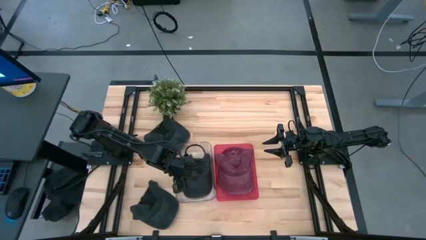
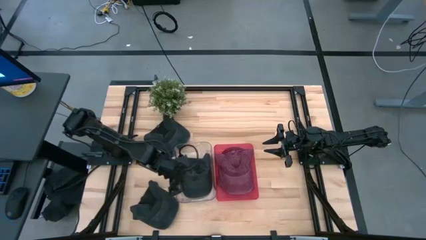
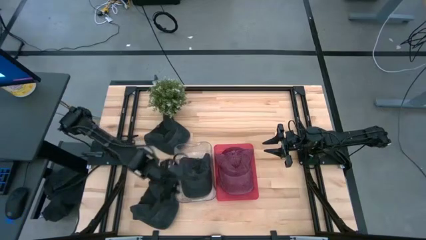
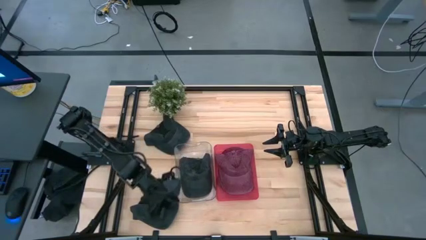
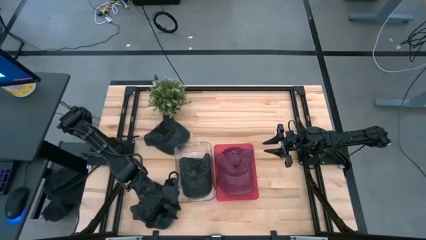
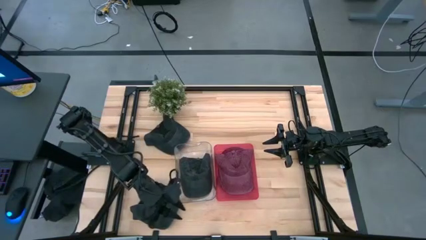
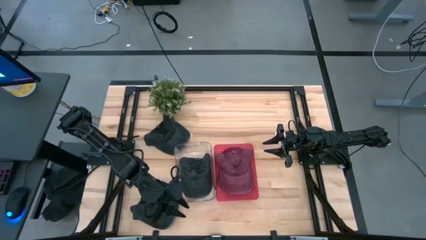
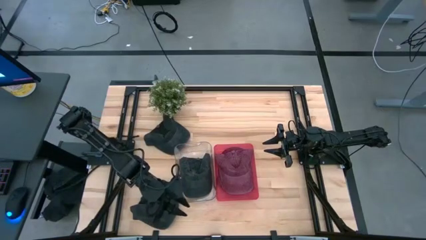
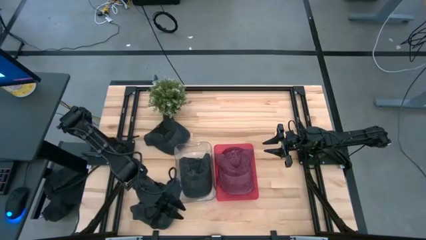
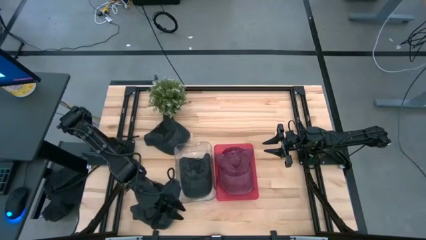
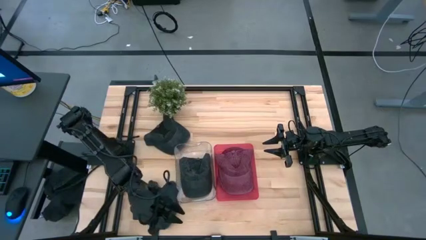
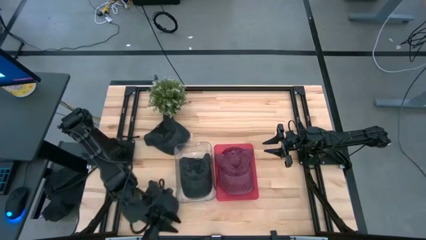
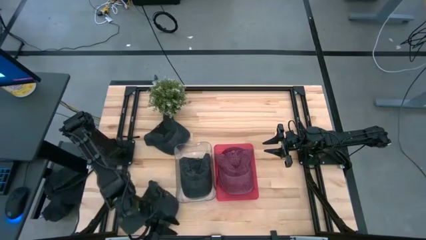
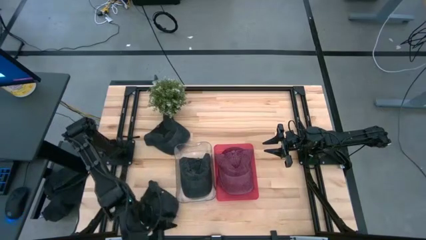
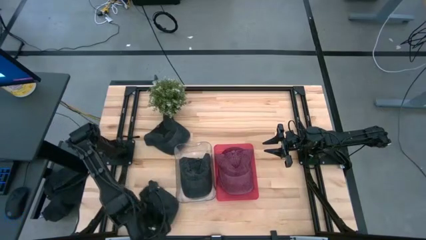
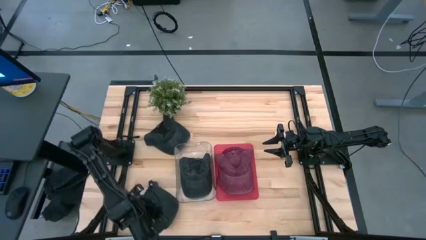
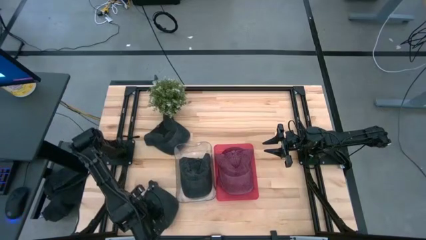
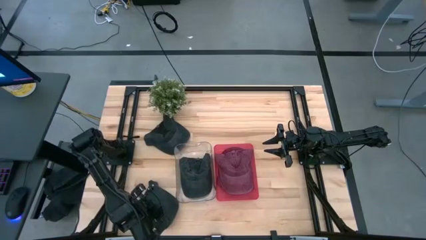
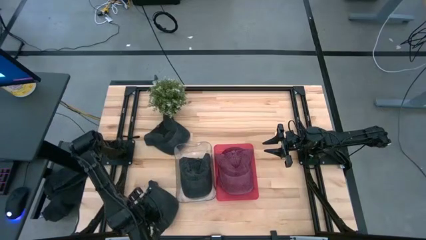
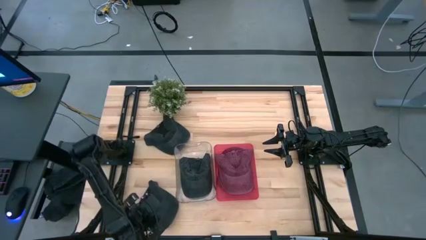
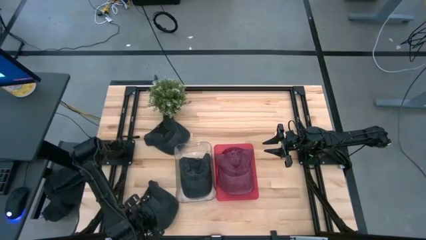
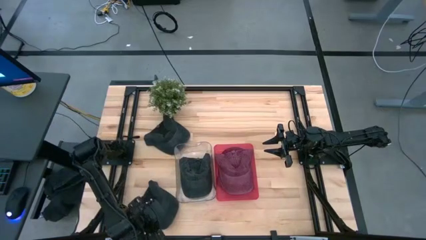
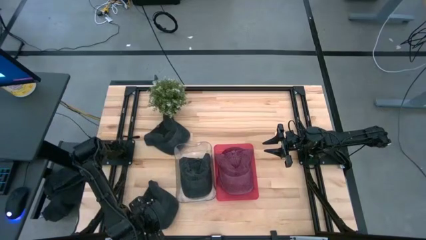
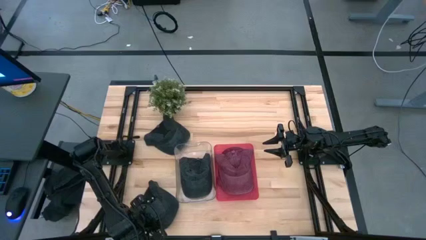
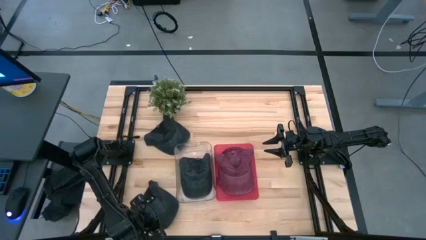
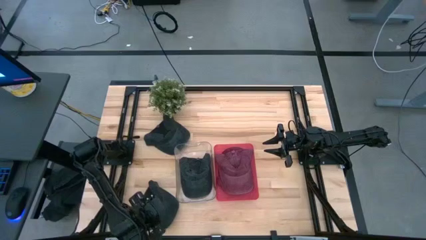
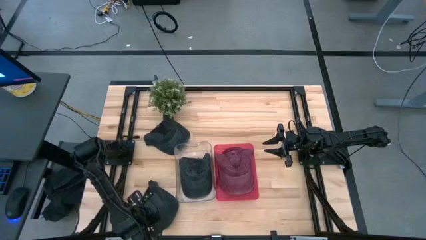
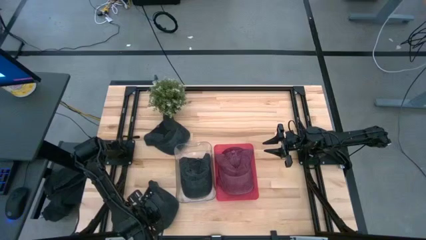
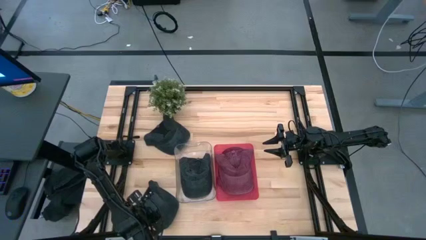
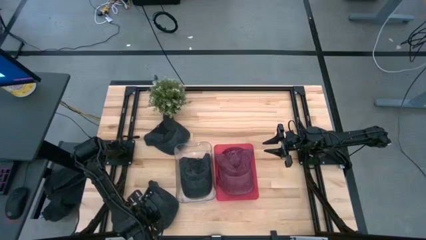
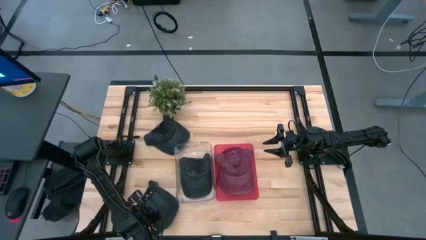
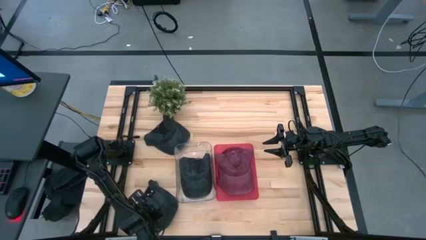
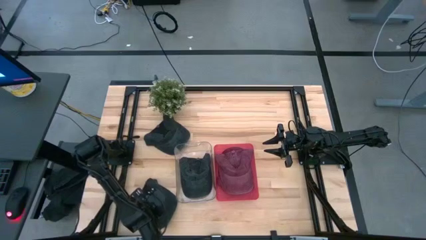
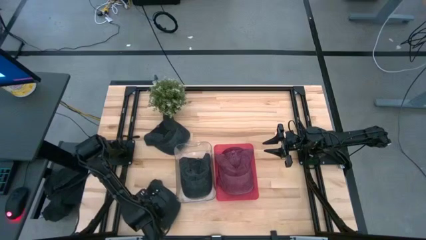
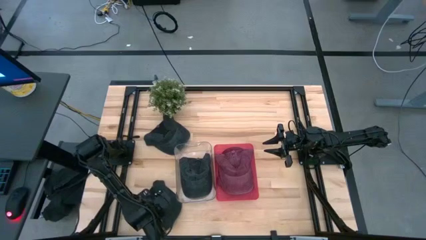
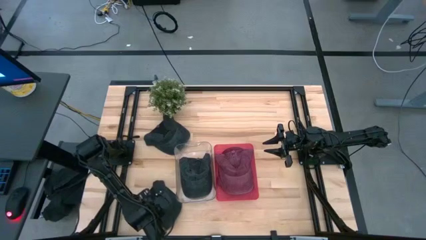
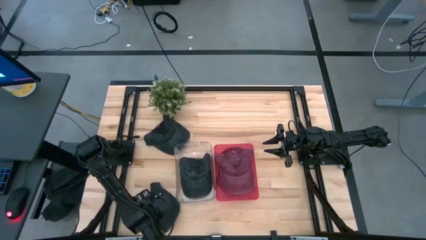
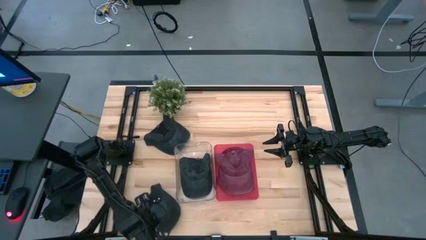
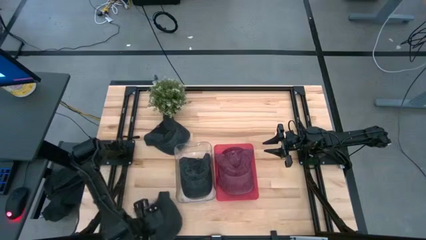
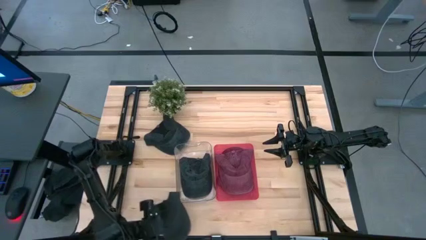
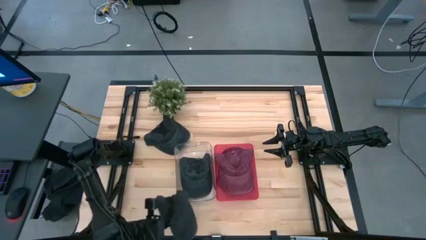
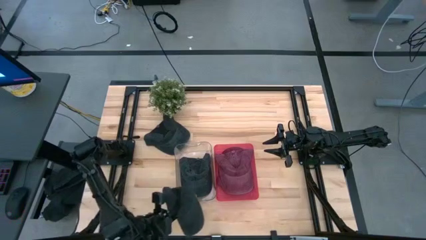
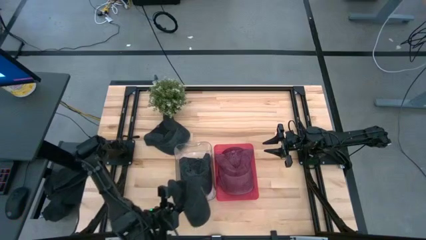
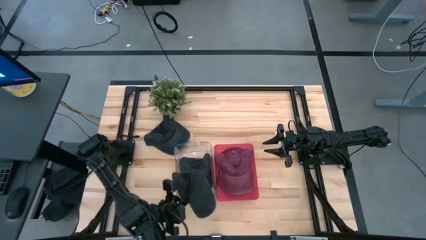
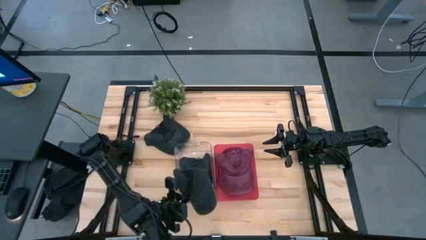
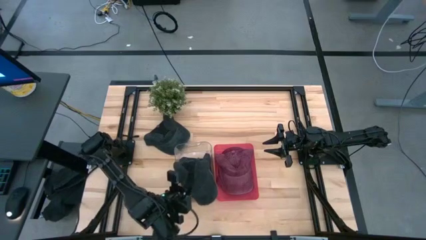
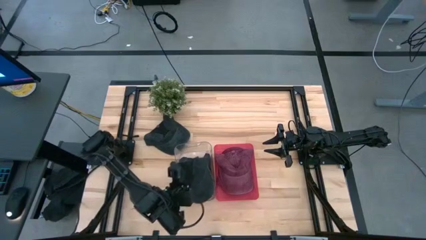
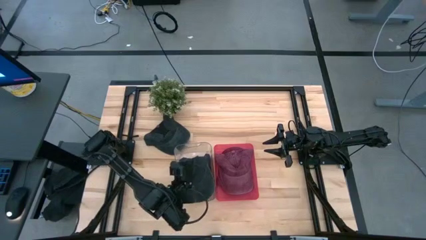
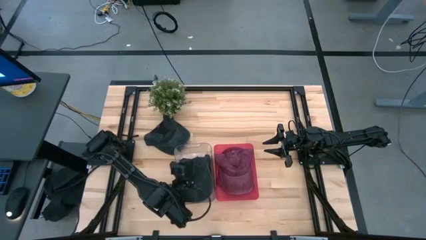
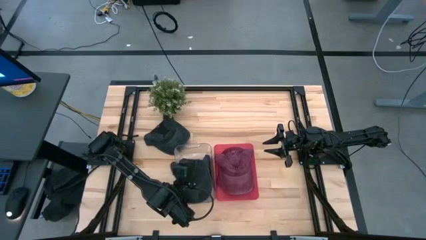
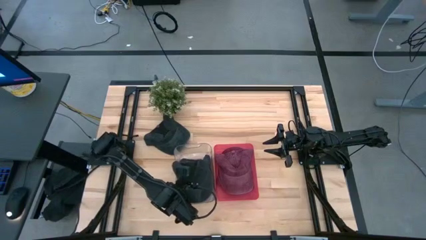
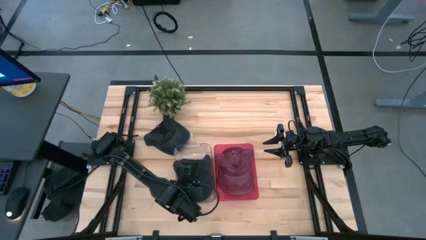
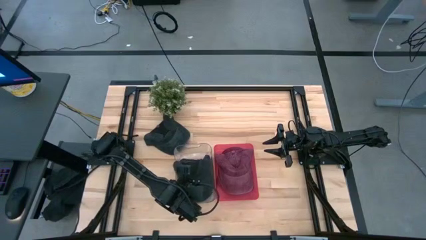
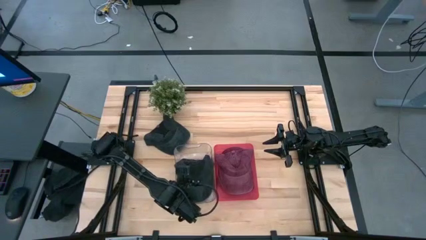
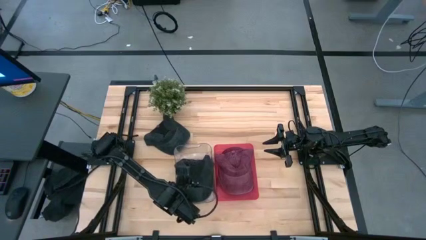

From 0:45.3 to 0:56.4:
Task: Pick & Place hat
Put the bottom black cap into the transparent bin
